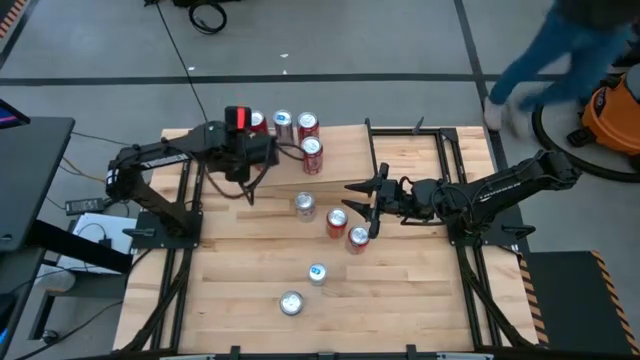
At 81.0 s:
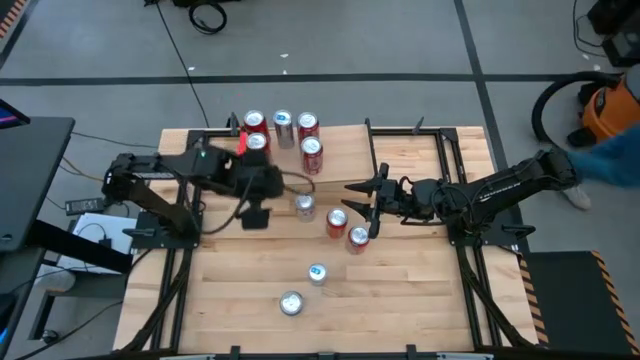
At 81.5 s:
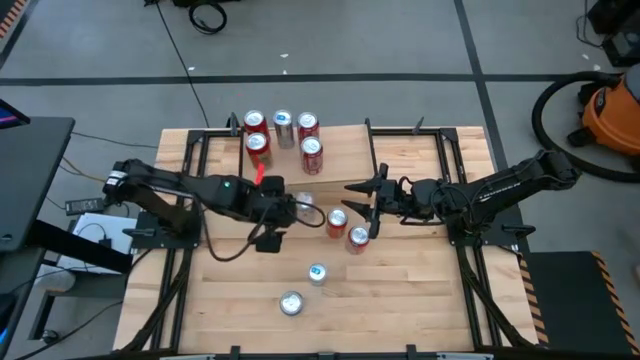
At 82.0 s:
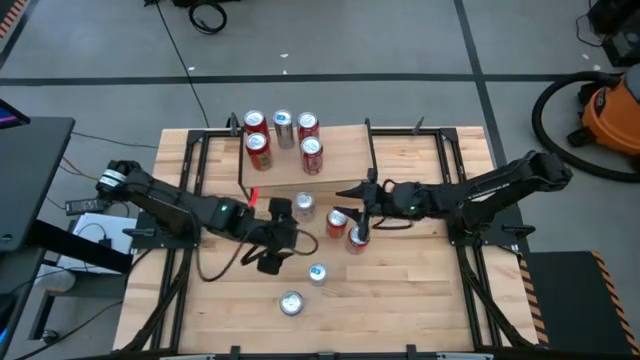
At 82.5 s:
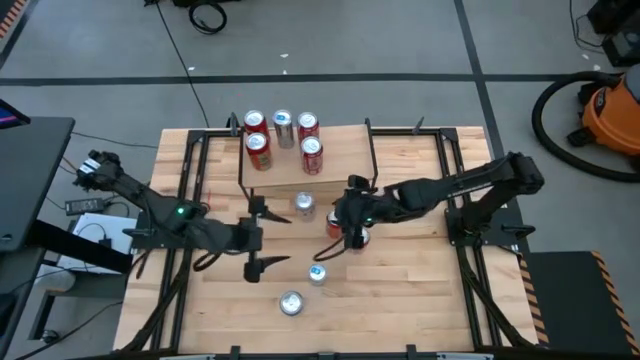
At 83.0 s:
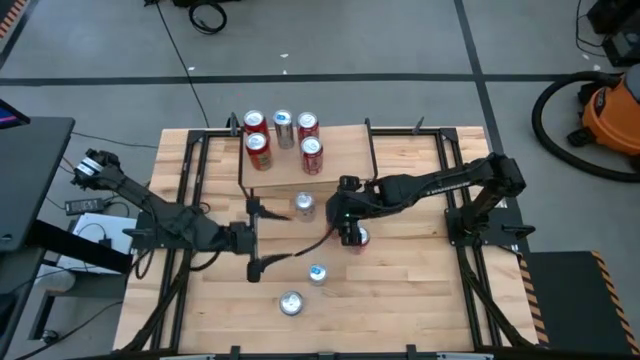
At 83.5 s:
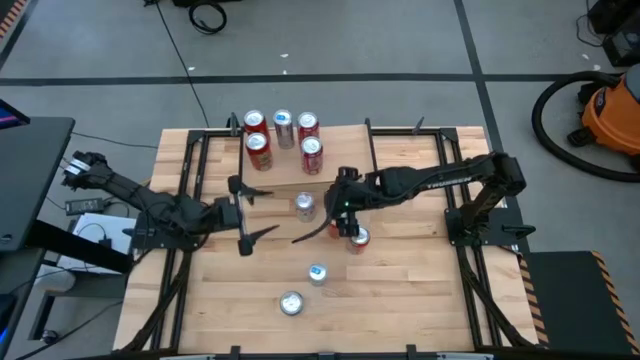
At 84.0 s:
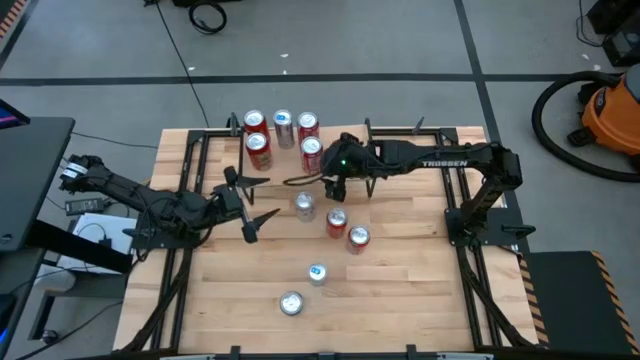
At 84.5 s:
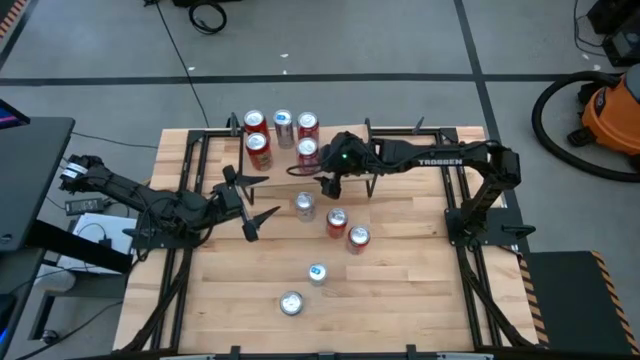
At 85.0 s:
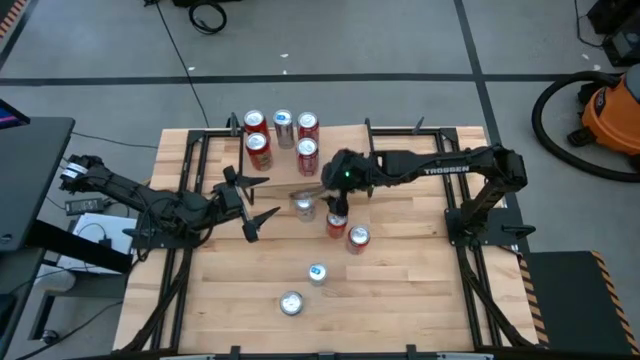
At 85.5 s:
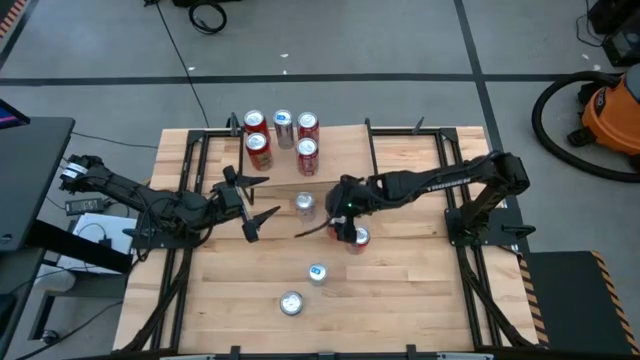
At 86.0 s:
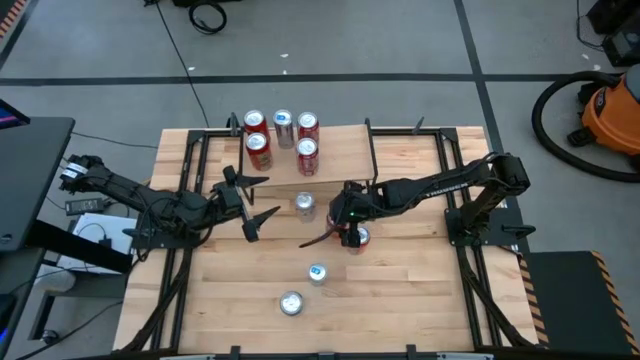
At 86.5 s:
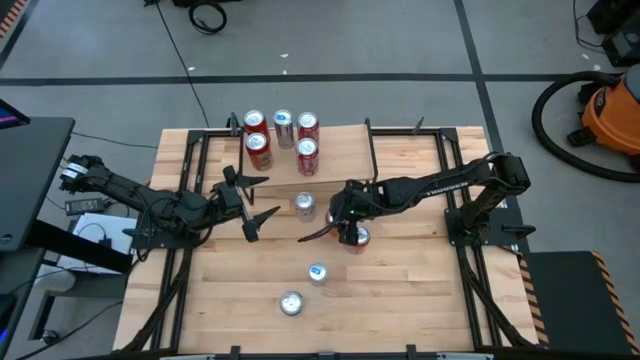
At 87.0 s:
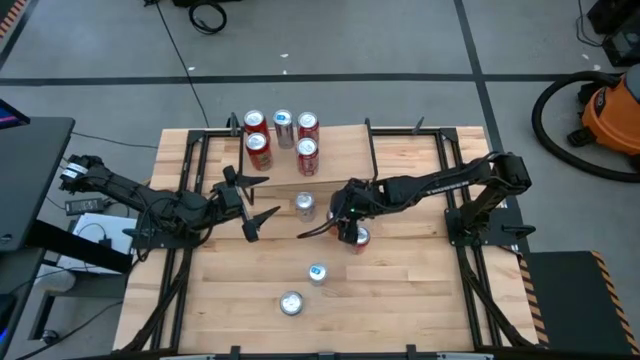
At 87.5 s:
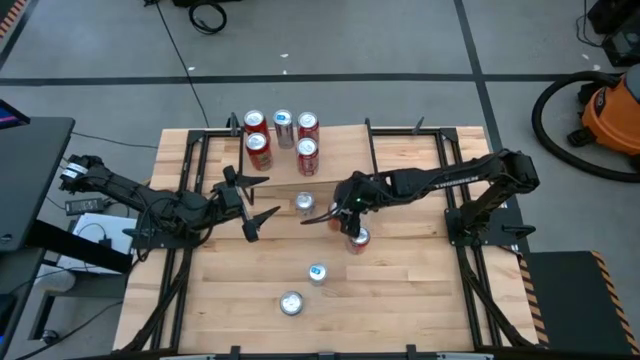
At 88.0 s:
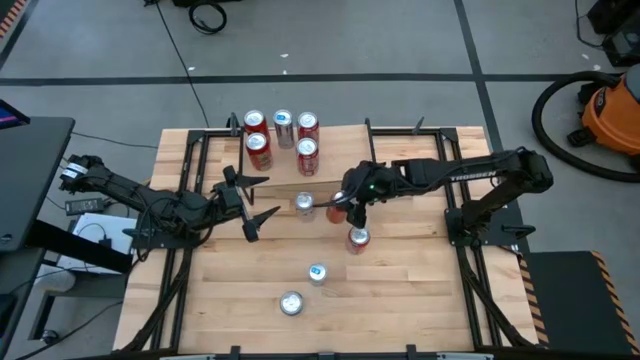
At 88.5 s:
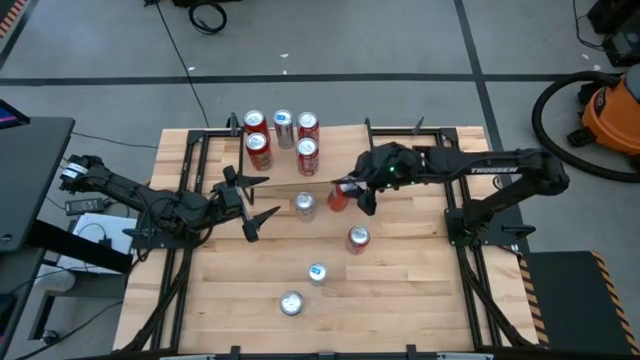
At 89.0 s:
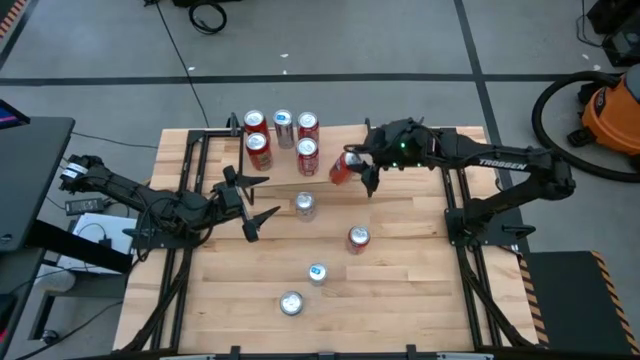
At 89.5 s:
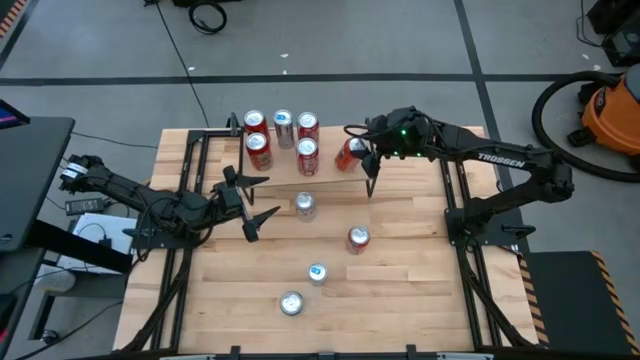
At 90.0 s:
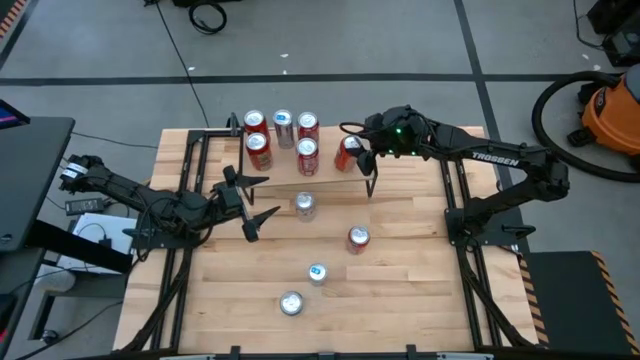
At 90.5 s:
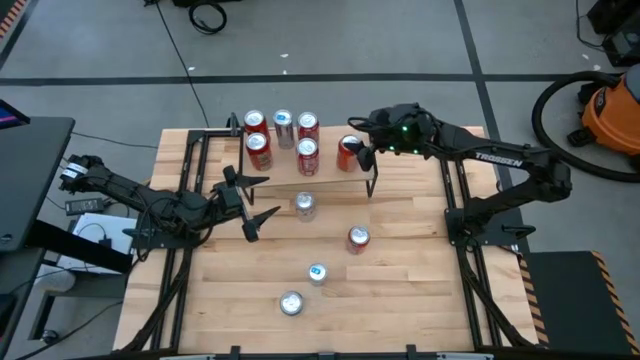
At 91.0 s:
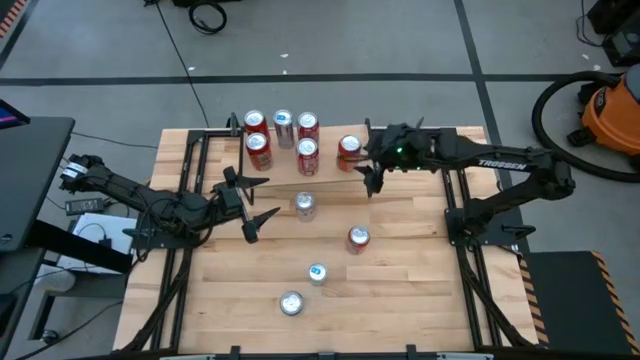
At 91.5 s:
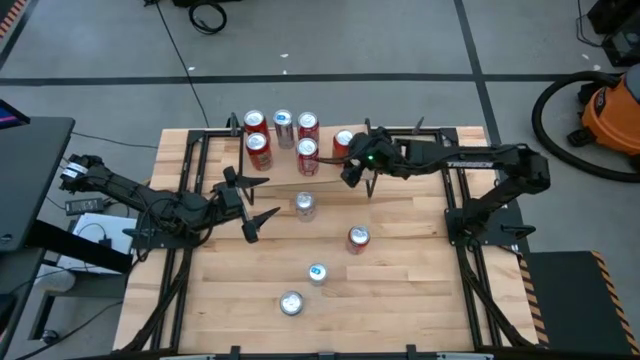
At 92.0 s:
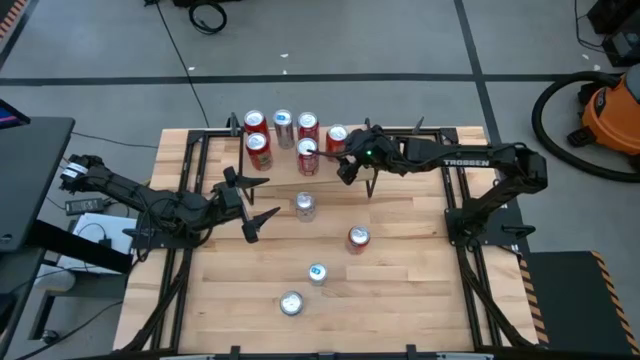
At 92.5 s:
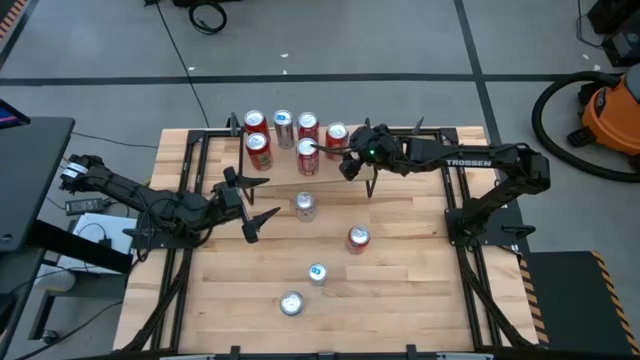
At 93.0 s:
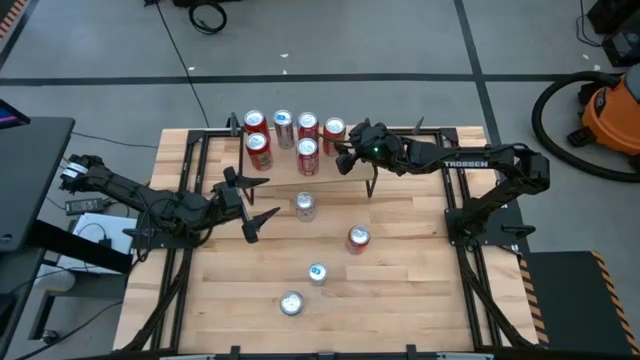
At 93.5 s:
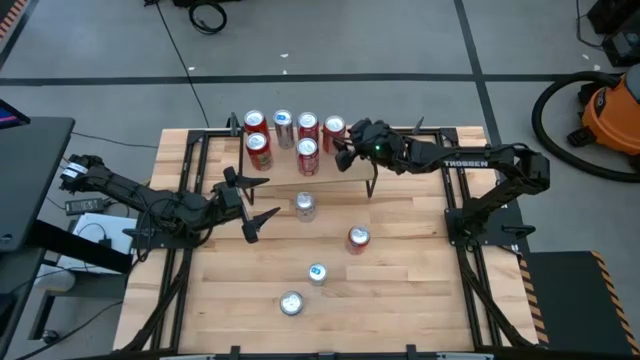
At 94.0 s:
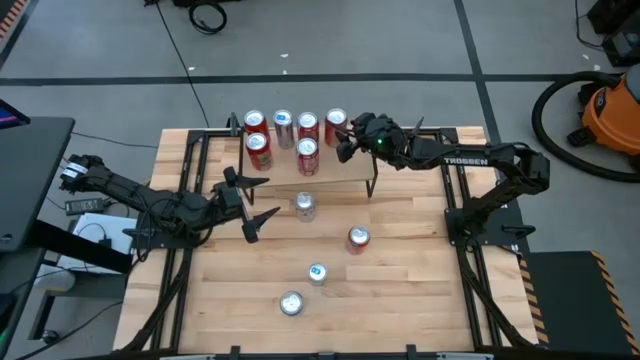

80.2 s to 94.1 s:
Task: Place canned beverage on shelf
Put the orange soda can on the shelf

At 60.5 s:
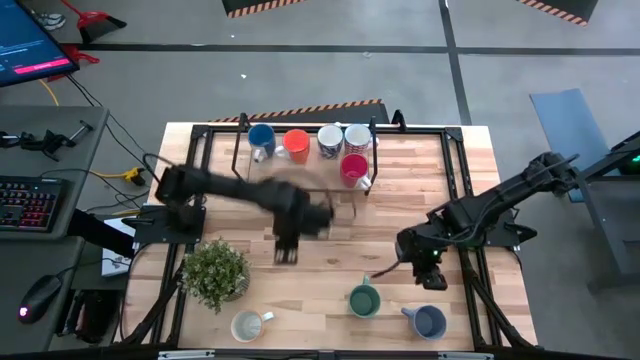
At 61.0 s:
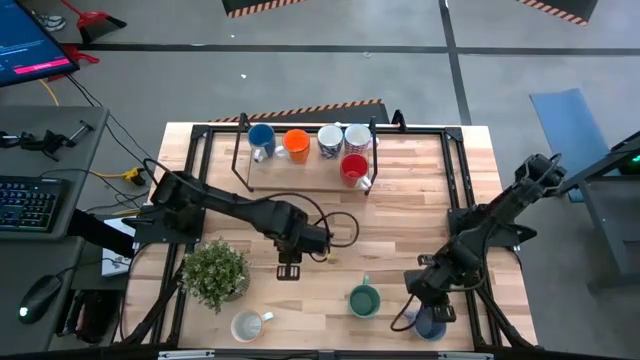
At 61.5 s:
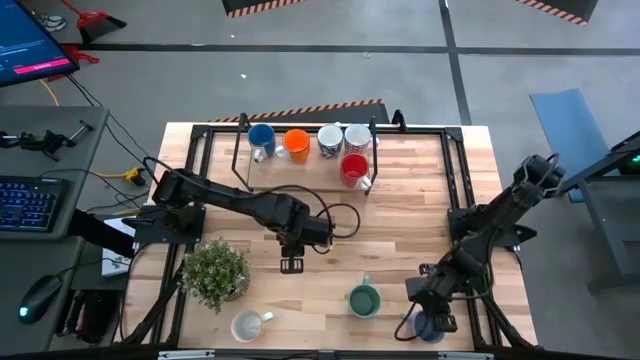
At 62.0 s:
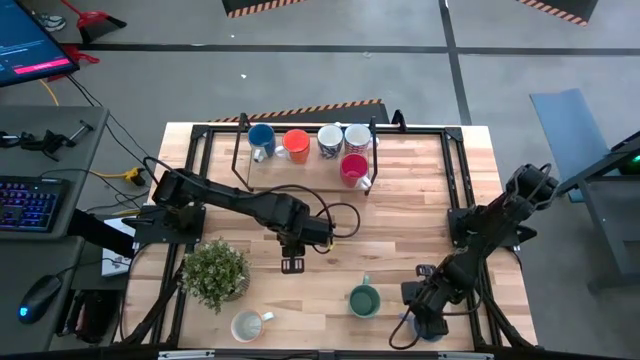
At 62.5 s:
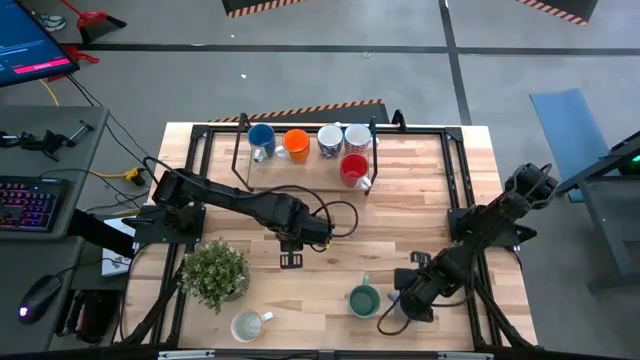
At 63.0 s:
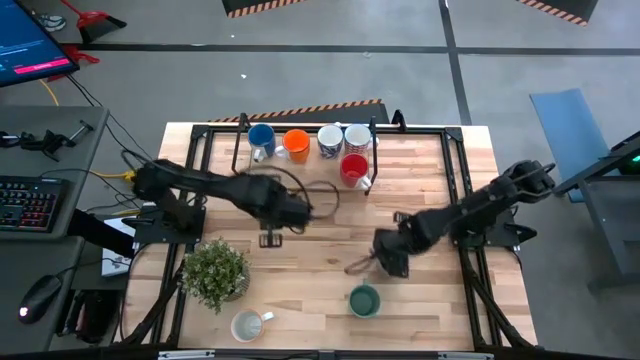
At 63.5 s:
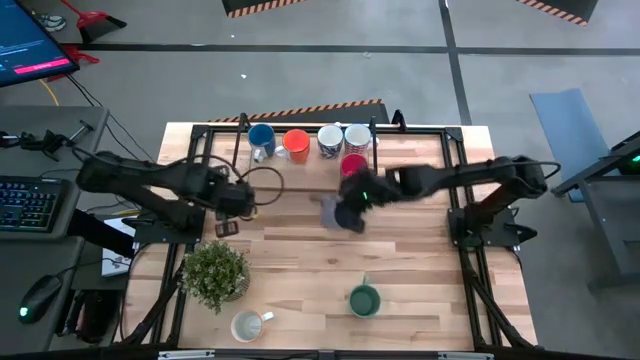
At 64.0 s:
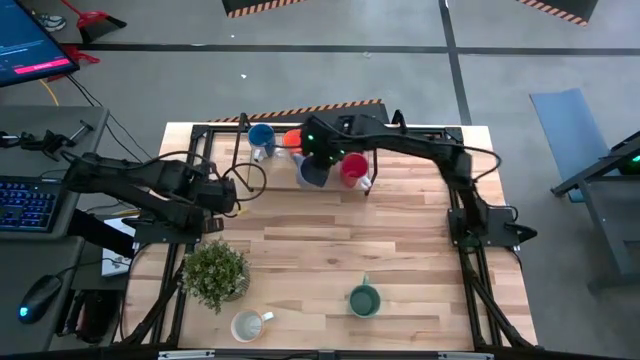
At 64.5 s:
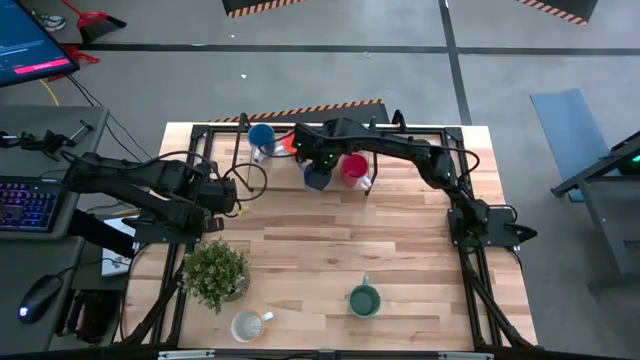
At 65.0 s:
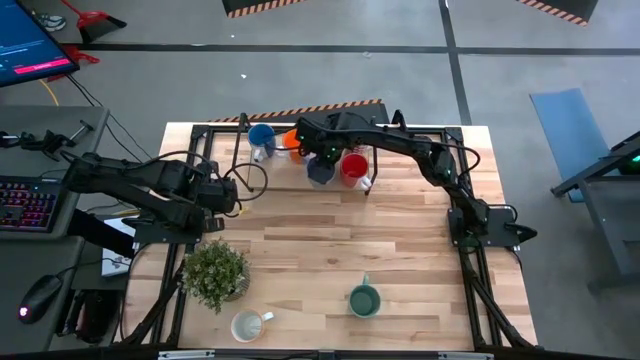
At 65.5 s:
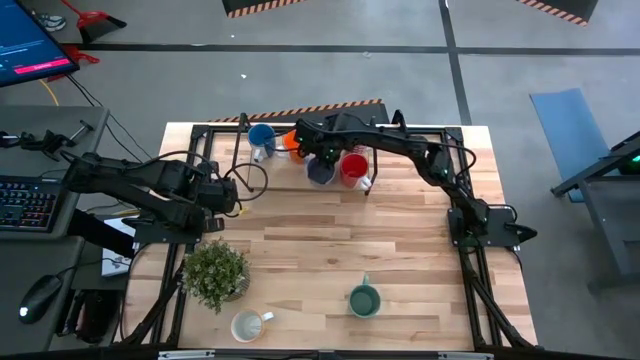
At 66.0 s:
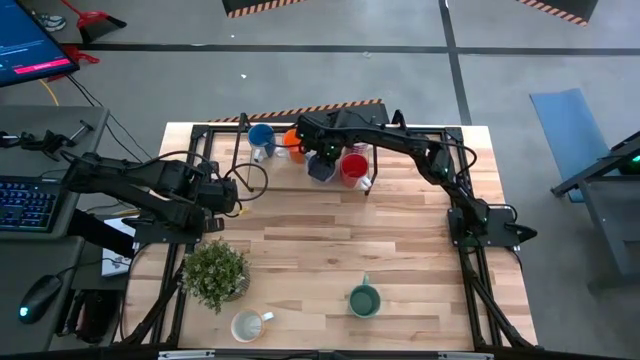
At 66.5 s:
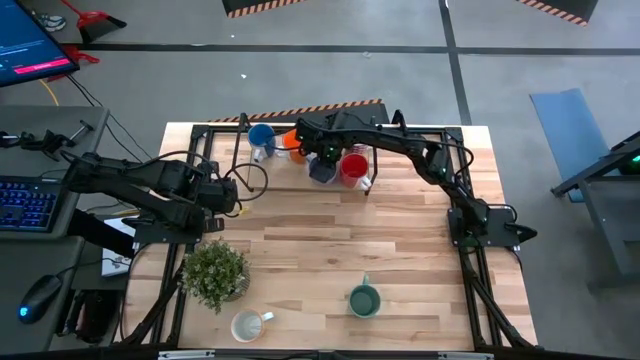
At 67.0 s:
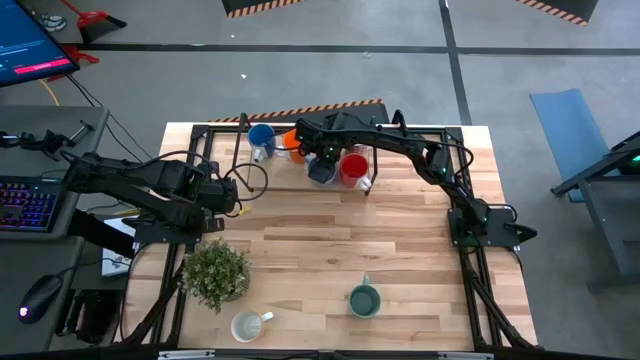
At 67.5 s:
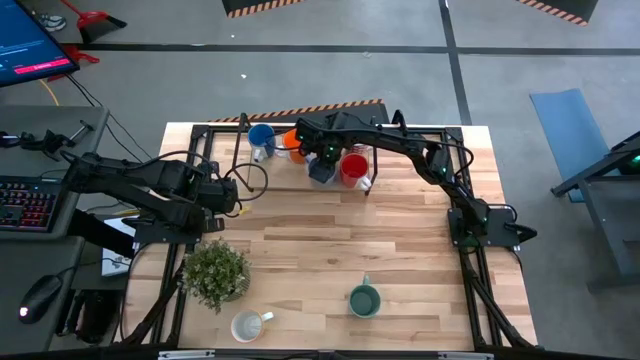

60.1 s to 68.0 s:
Task: Place coffee mugs
Put the purple mug on the shelf
